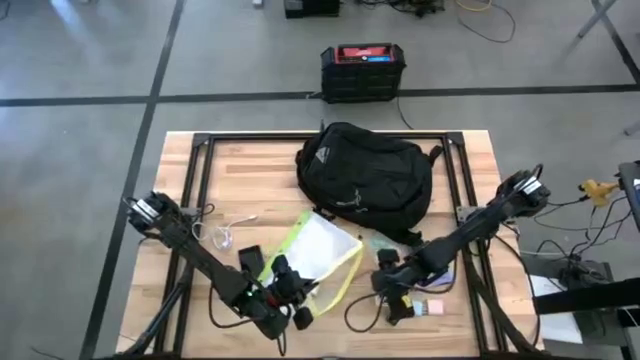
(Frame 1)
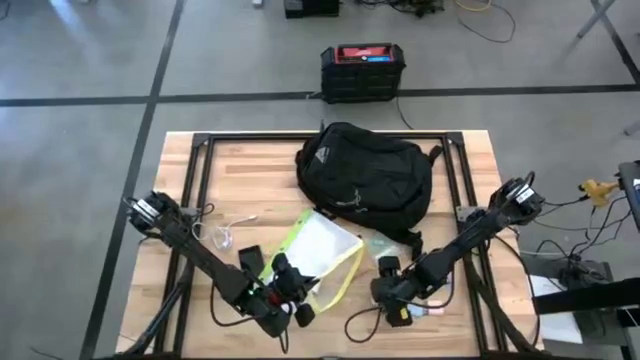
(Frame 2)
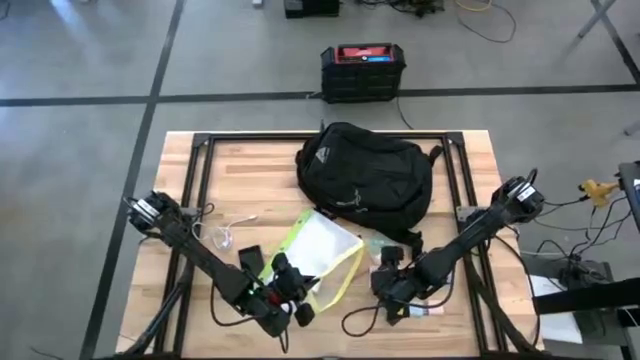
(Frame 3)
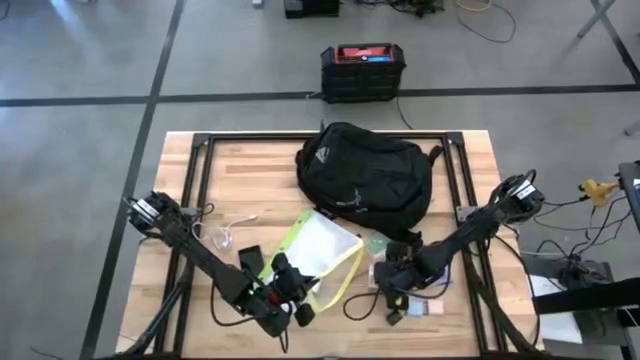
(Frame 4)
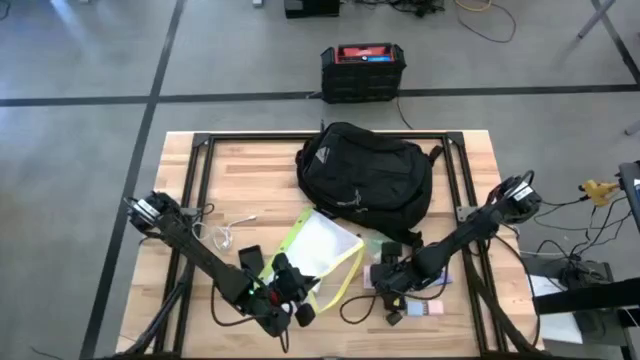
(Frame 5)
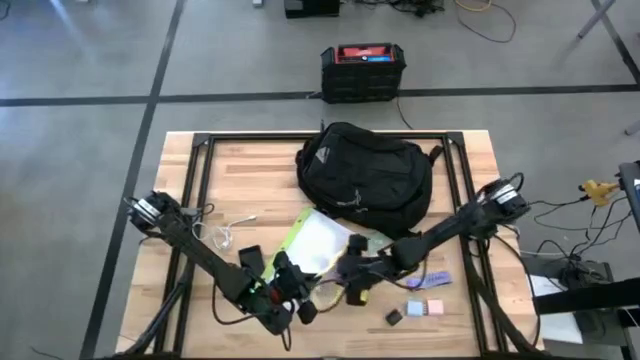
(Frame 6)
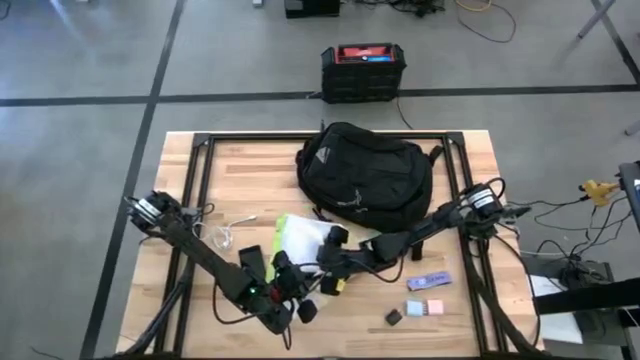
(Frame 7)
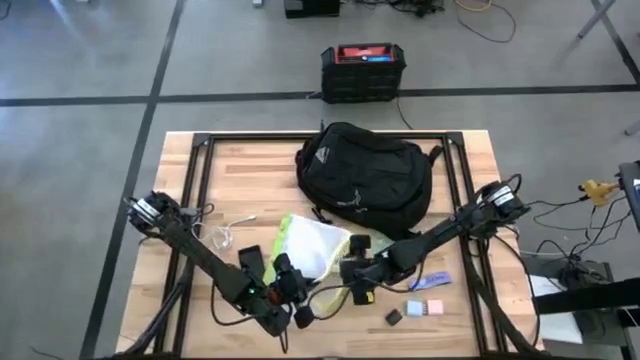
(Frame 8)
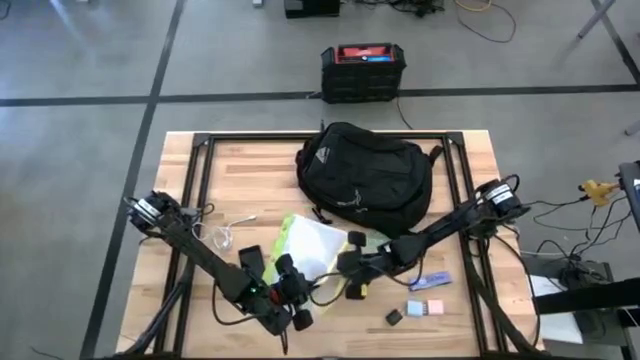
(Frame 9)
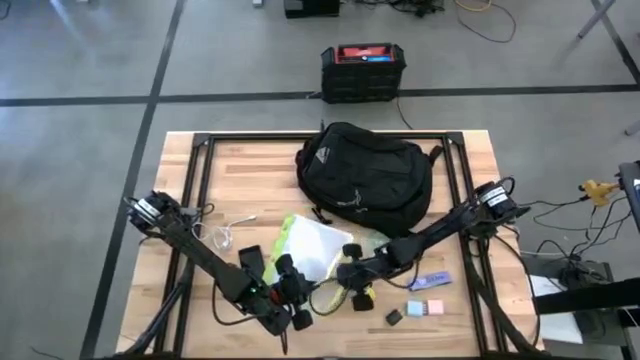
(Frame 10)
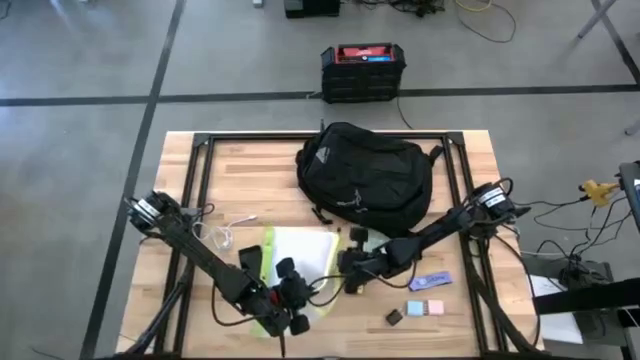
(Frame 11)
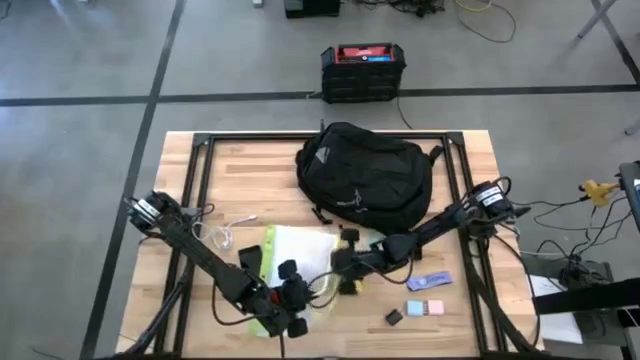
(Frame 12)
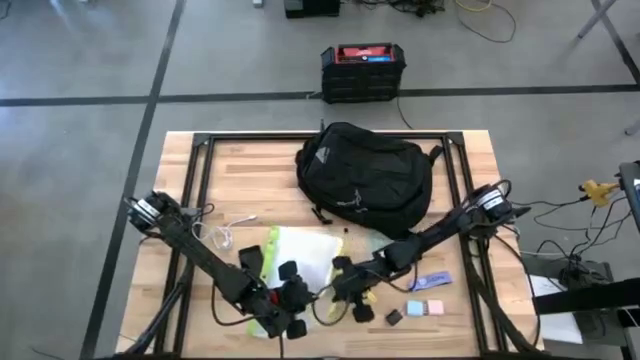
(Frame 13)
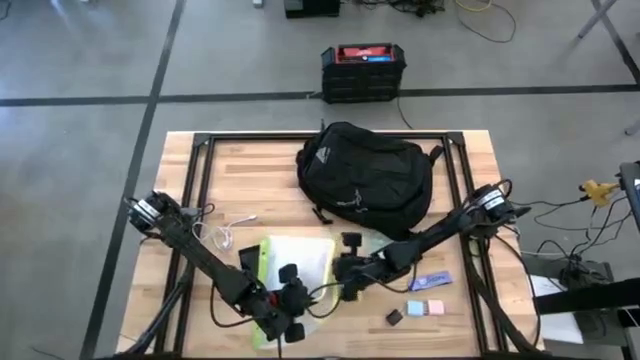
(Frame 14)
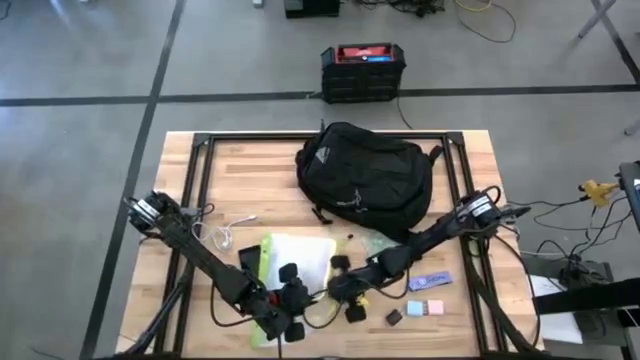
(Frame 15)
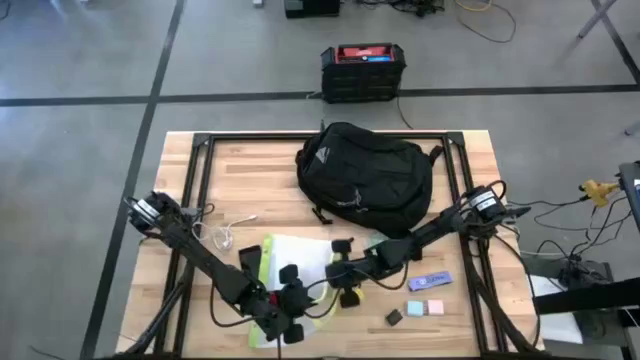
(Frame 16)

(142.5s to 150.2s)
Task: Unpack backpack
Put the purple game cards into the yellow green zip bag

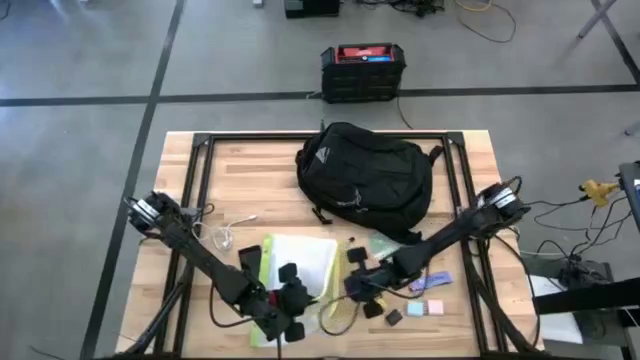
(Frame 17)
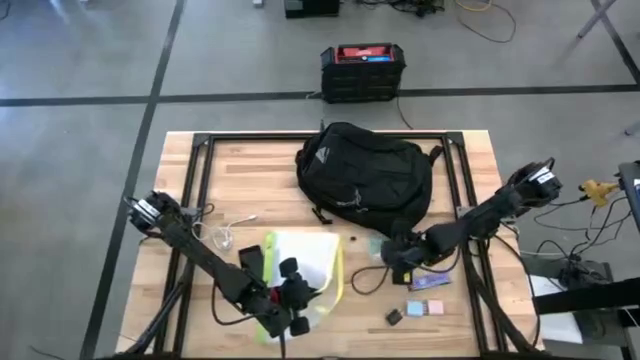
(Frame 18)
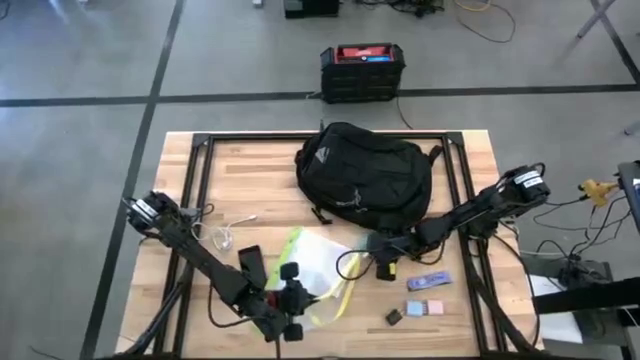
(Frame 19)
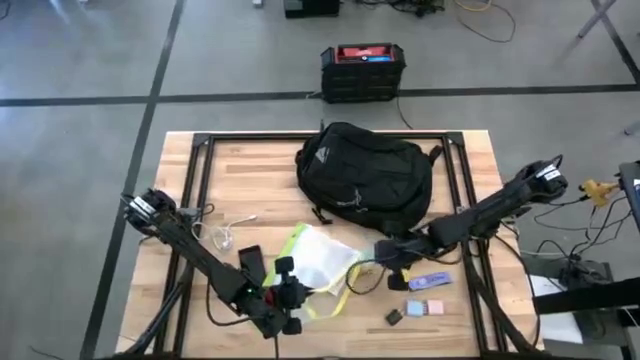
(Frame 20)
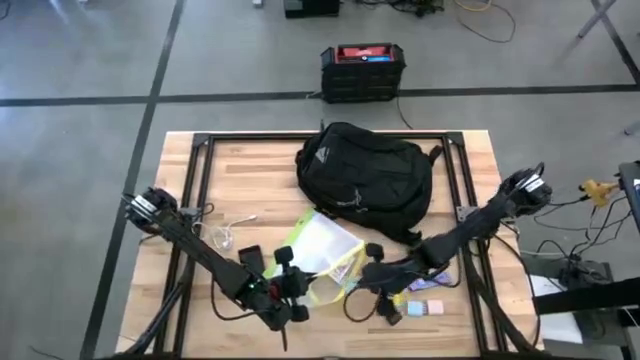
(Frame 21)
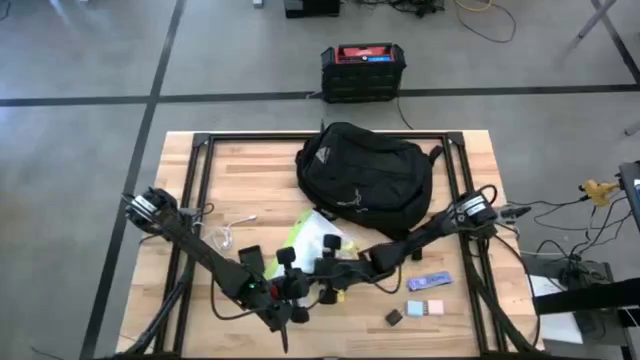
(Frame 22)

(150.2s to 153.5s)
Put the packed green earphone into the yellow green zip bag

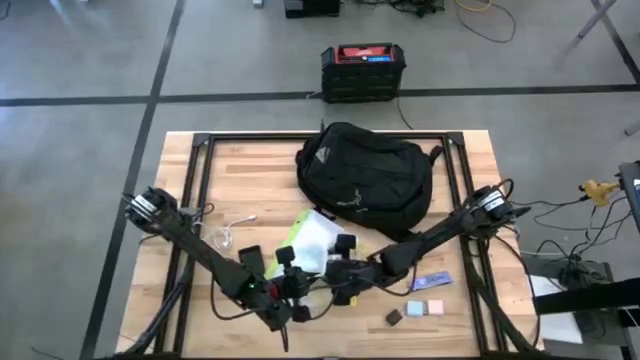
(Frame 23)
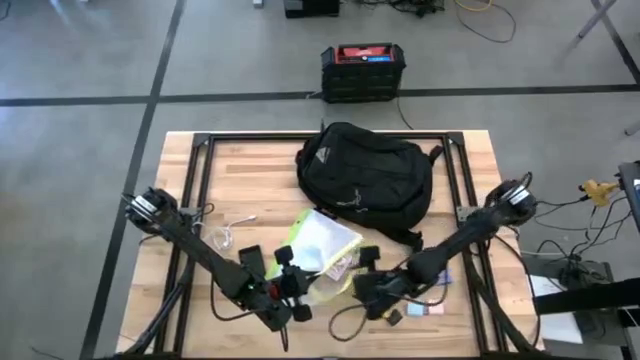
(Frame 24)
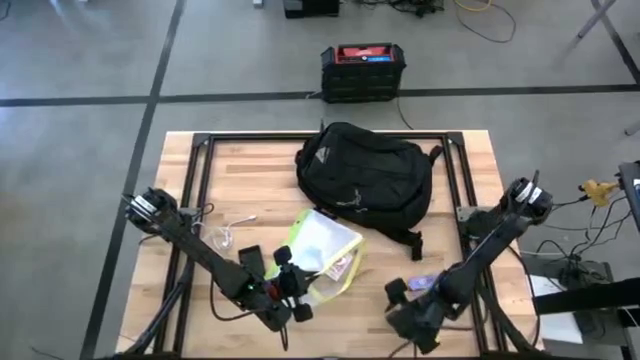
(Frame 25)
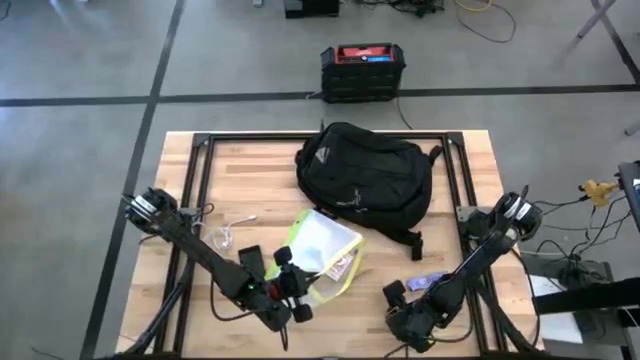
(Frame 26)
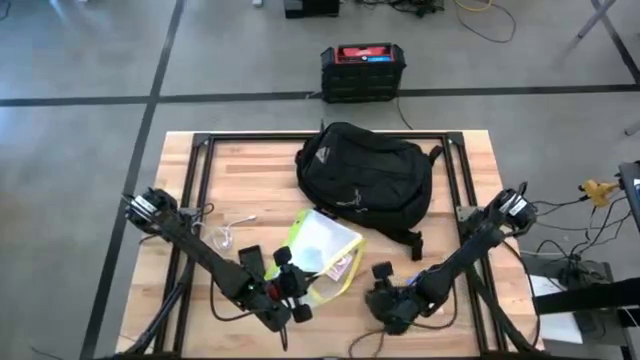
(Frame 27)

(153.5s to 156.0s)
Put the black charger adapter into the yellow green zip bag

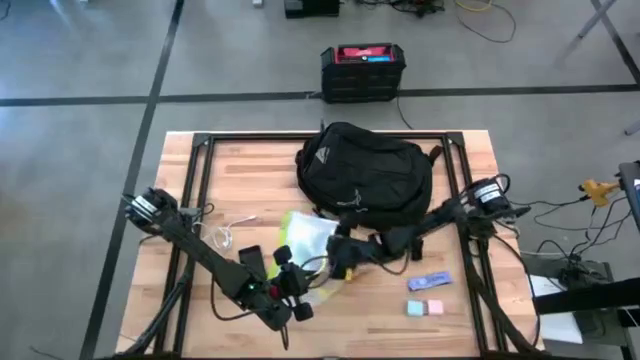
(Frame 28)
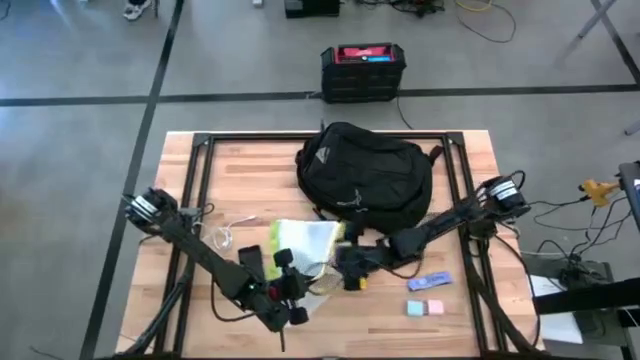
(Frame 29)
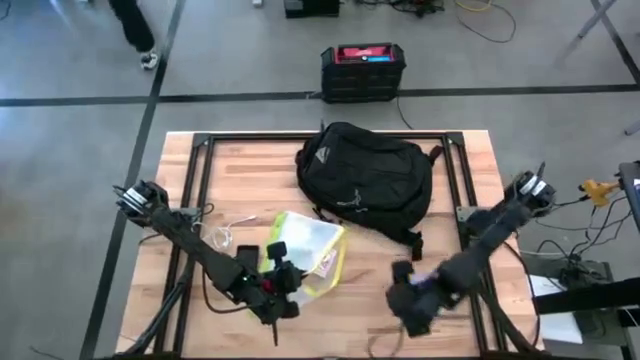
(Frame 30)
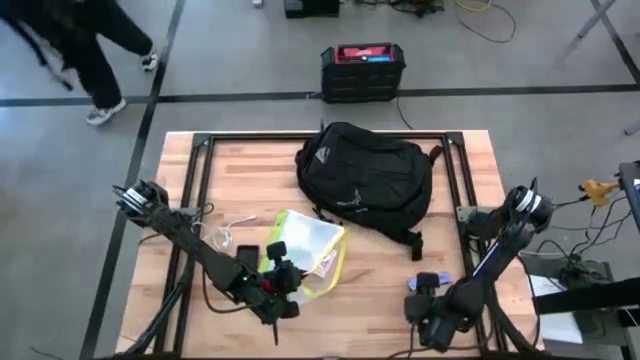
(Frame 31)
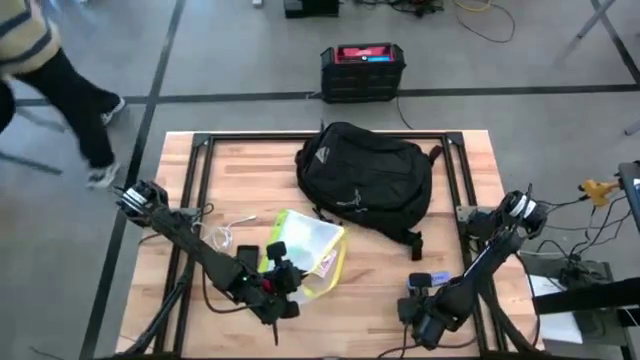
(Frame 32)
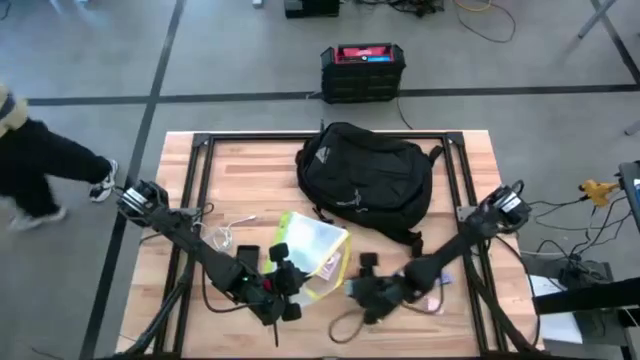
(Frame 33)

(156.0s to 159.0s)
Put the blue charger adapter into the yellow green zip bag

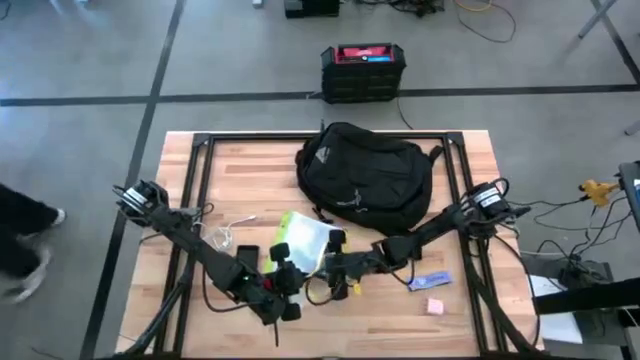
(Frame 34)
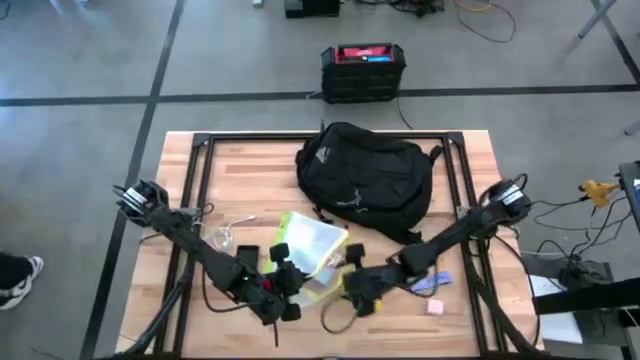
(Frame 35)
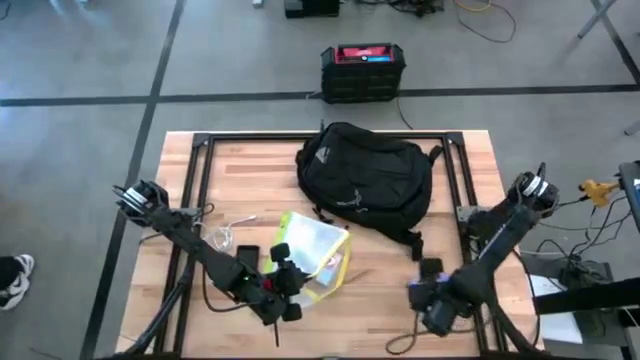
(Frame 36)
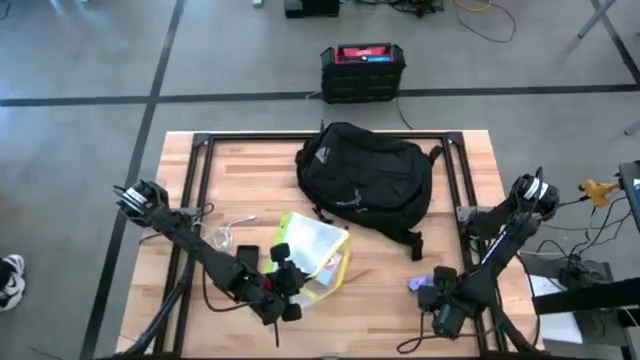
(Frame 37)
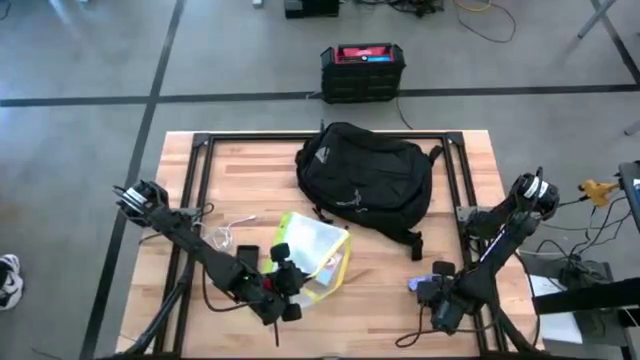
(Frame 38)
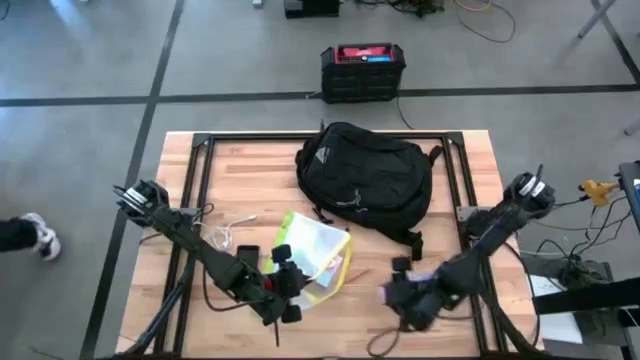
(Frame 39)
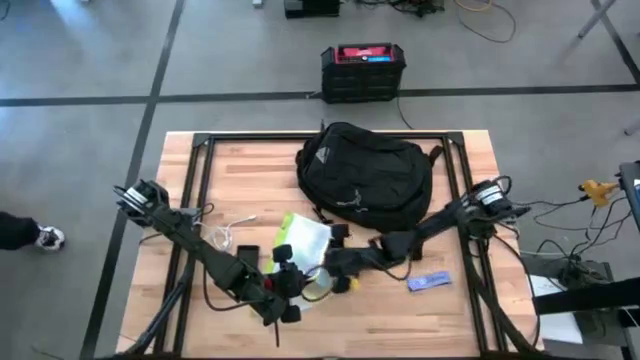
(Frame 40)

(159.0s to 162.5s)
Put the pink charger adapter into the yellow green zip bag

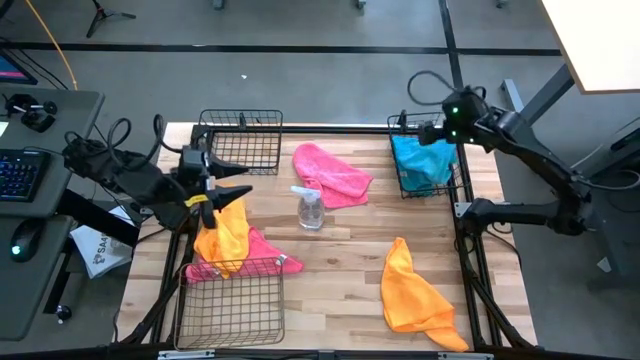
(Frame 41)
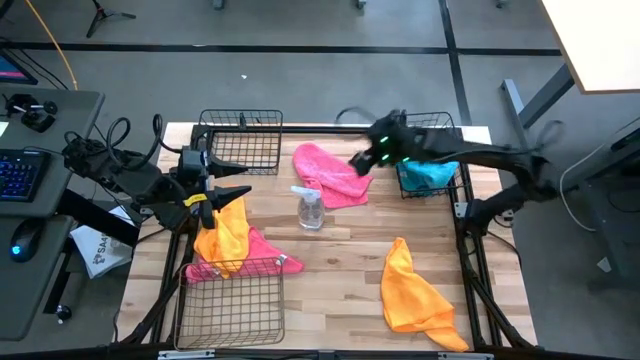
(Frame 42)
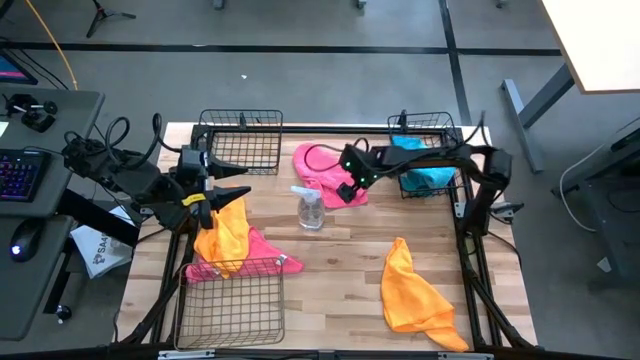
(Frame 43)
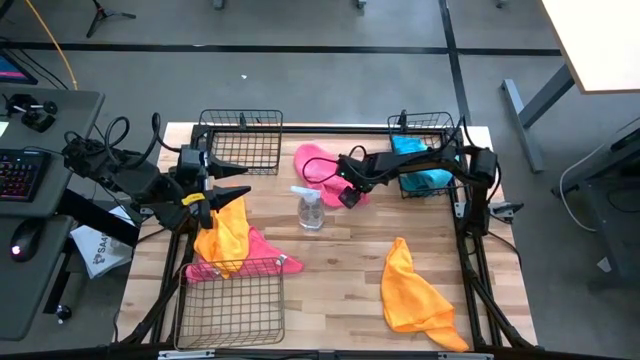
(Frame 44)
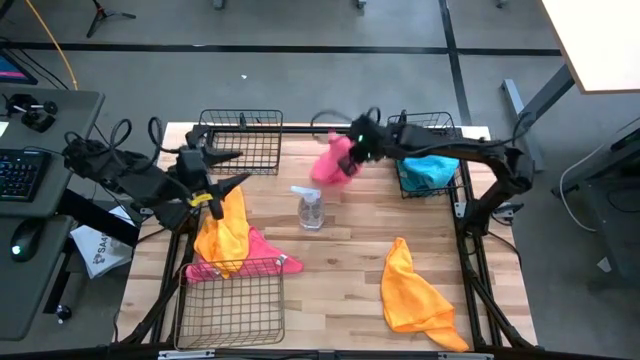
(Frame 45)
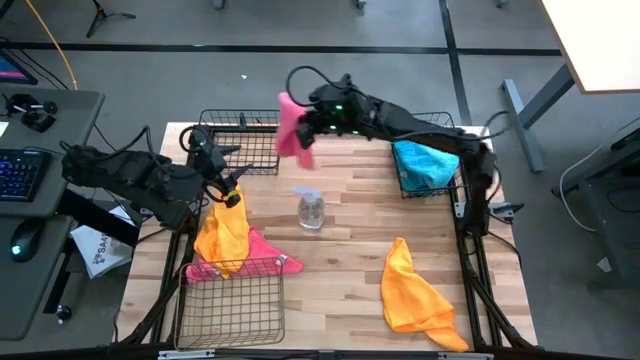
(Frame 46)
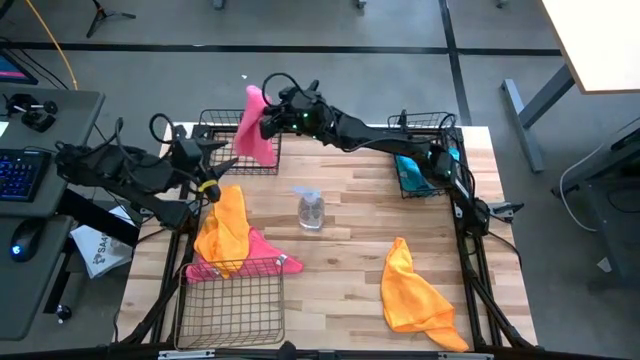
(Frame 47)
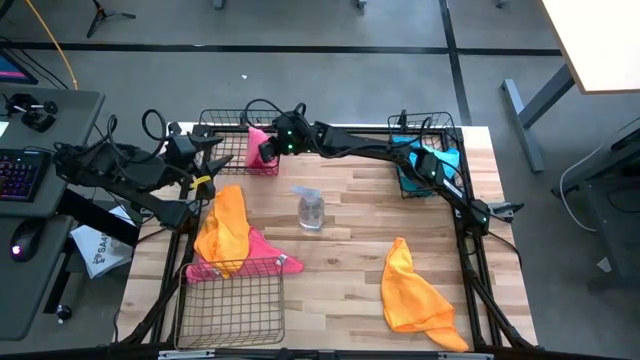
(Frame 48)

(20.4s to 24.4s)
Task: Sort microfiber towel by color & place in baskets
Put the top pink microfiber towel into the left black wire basket
